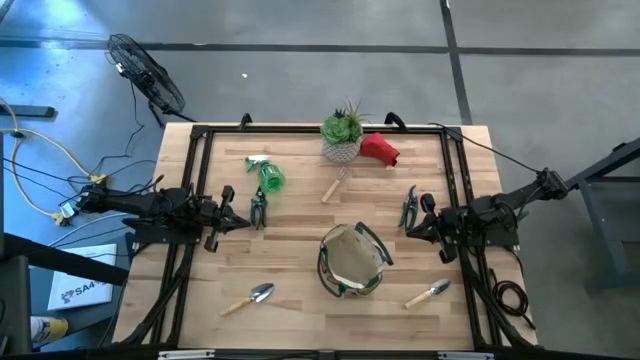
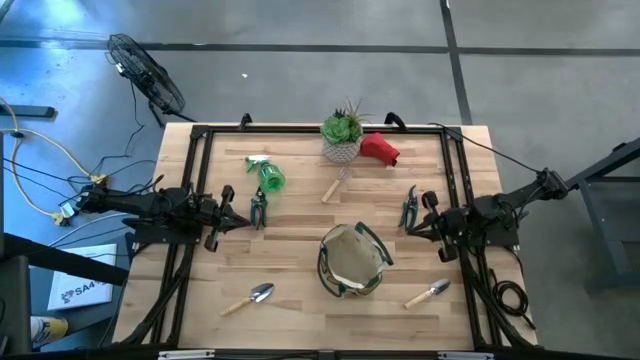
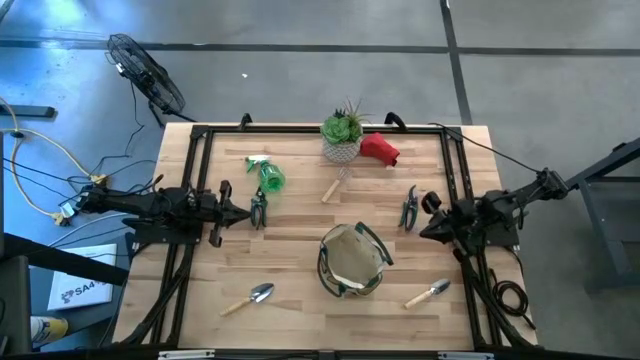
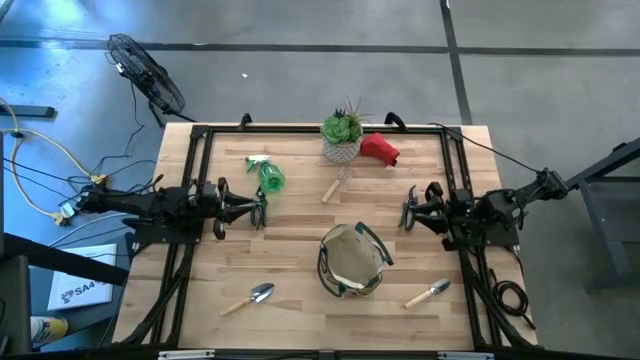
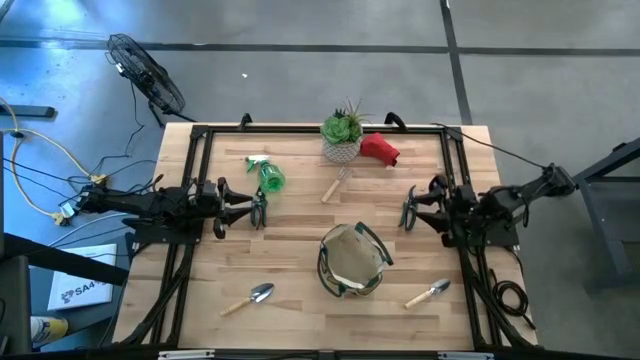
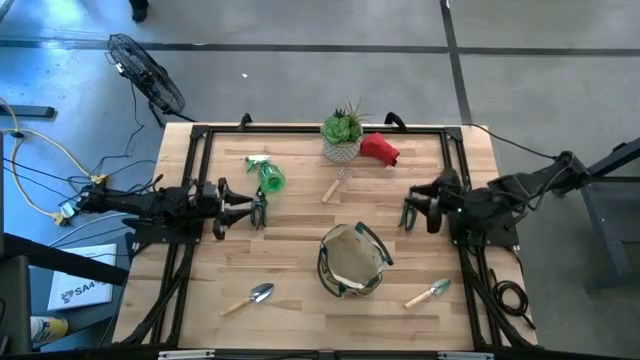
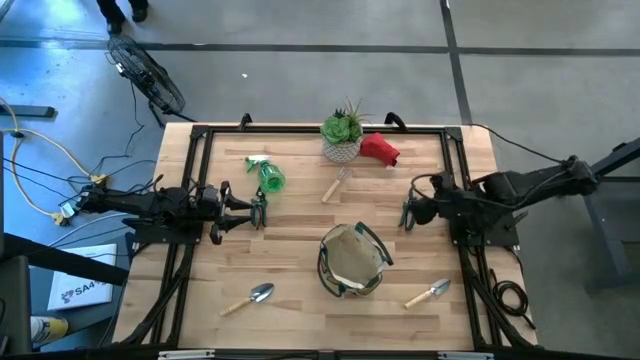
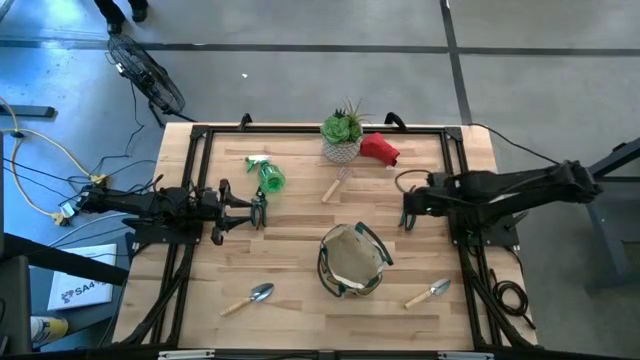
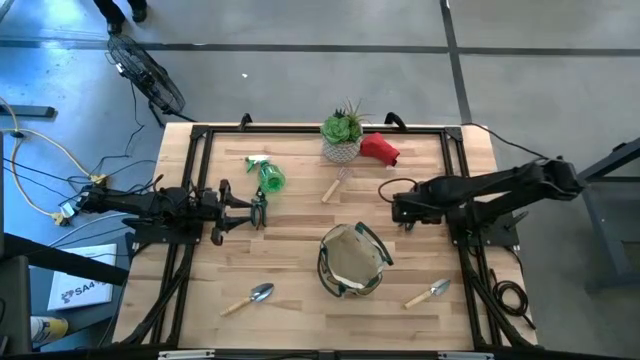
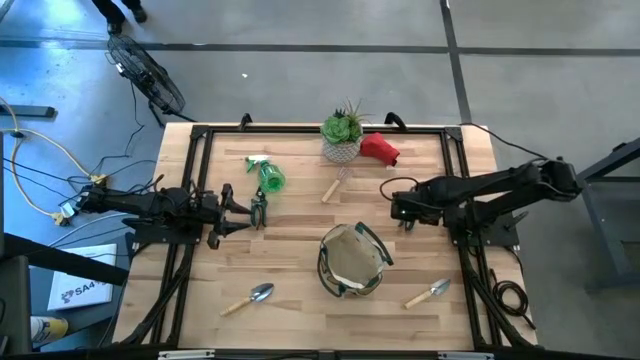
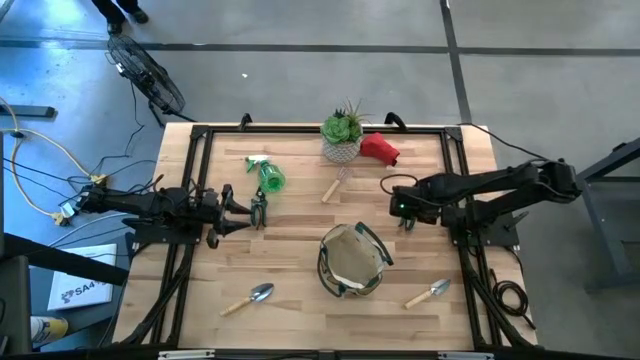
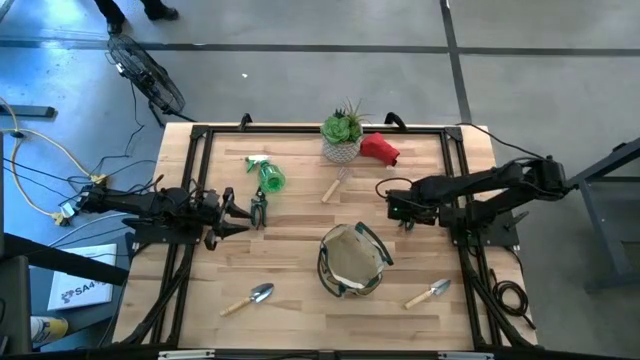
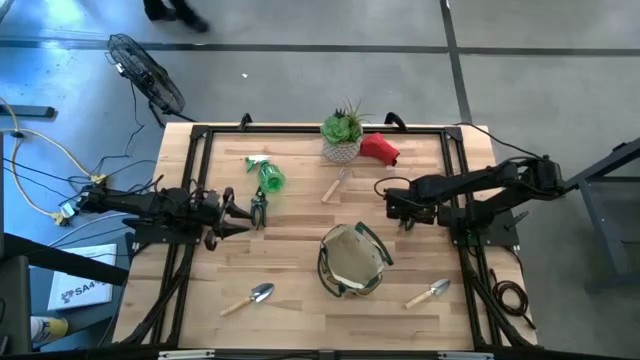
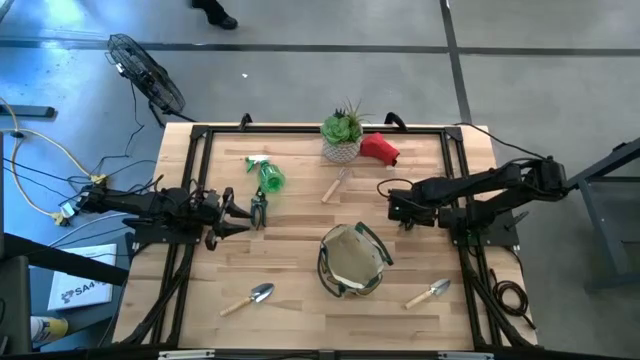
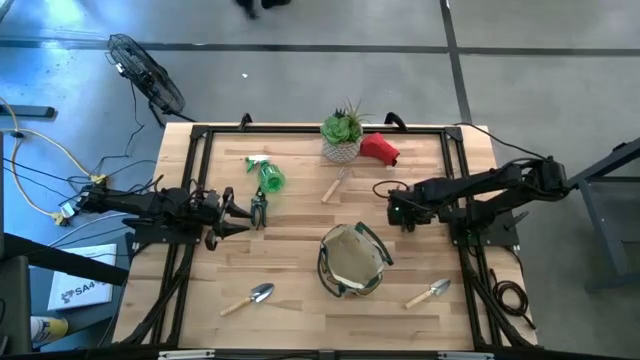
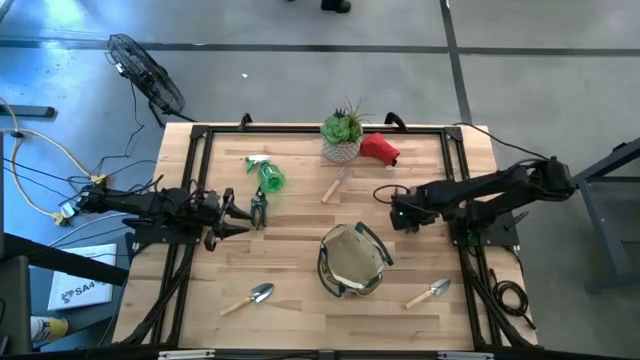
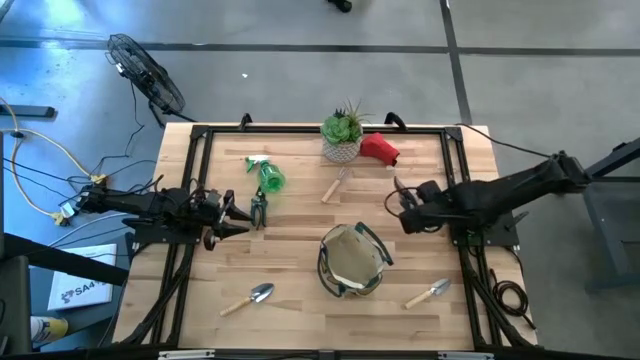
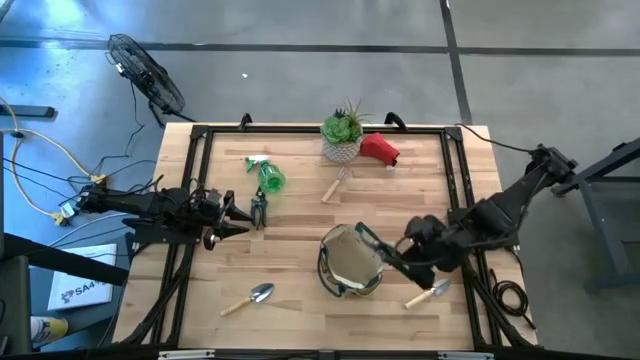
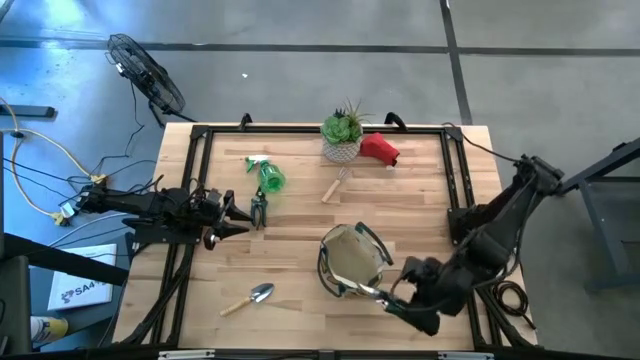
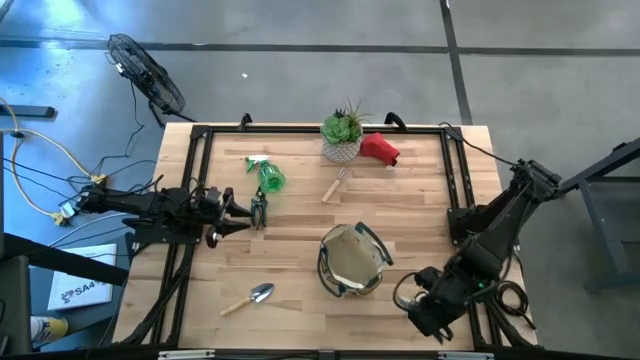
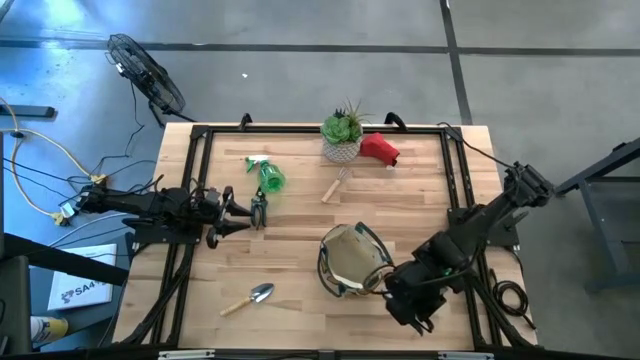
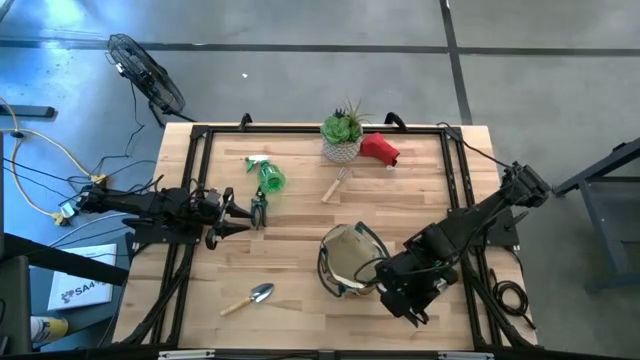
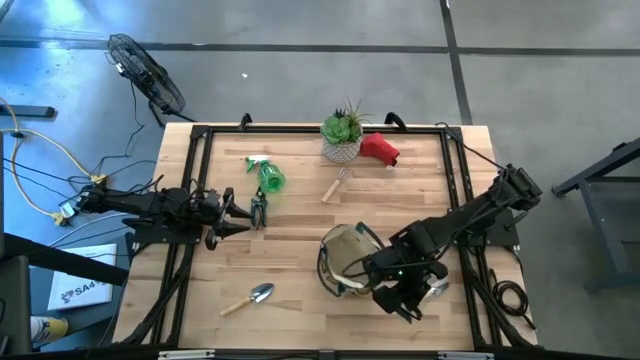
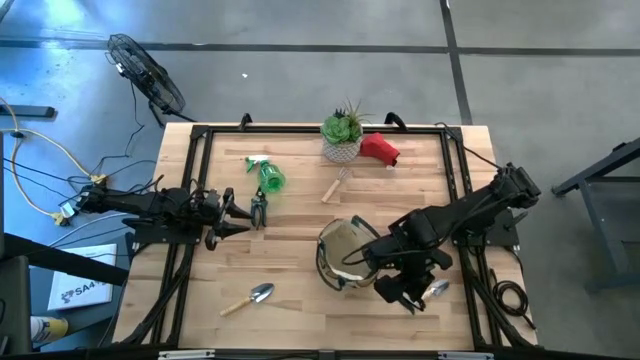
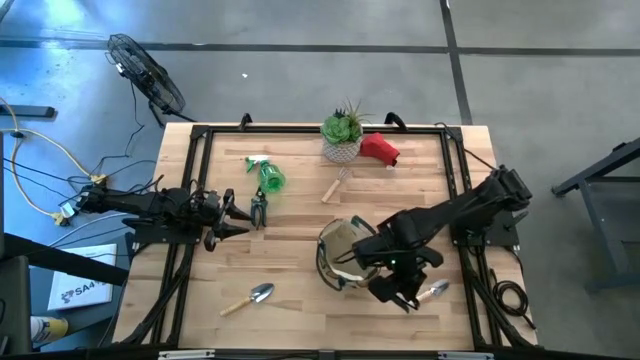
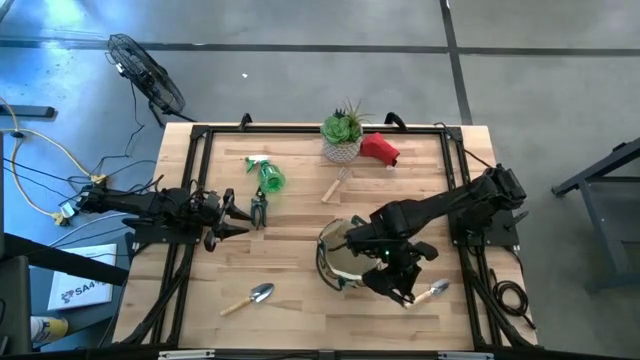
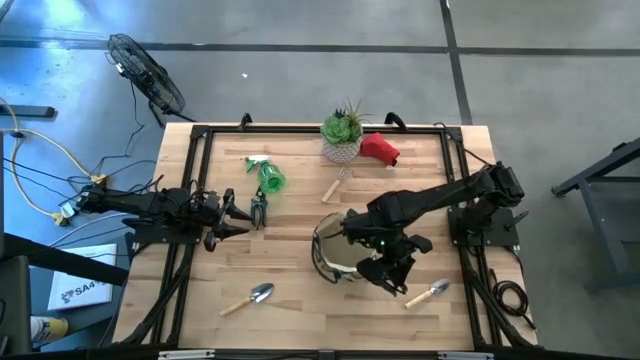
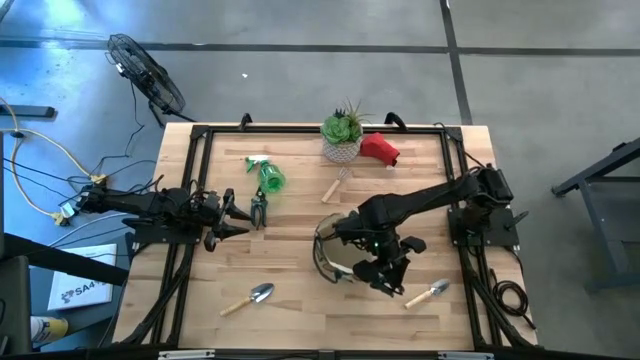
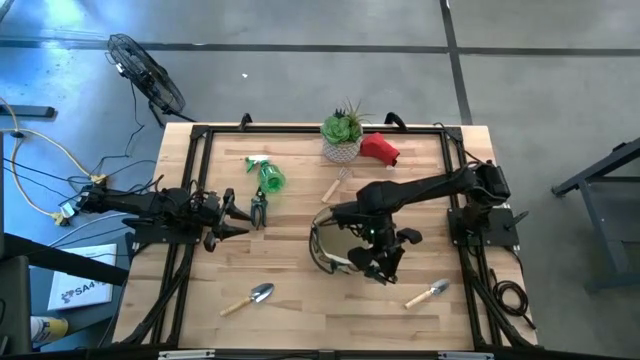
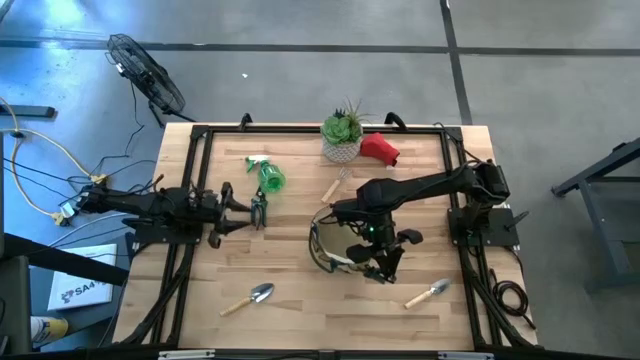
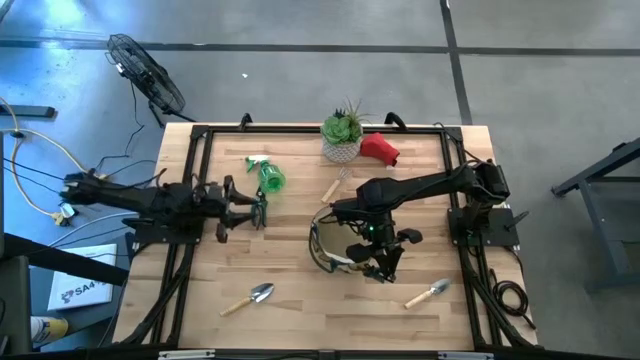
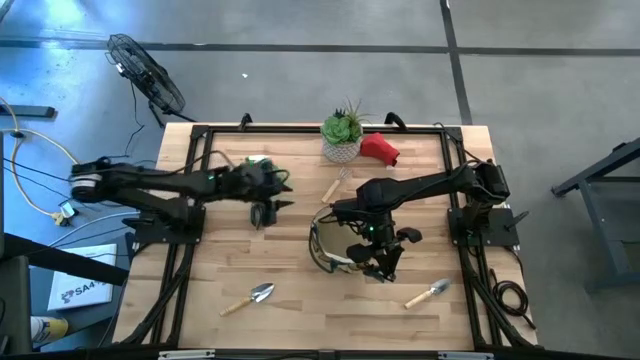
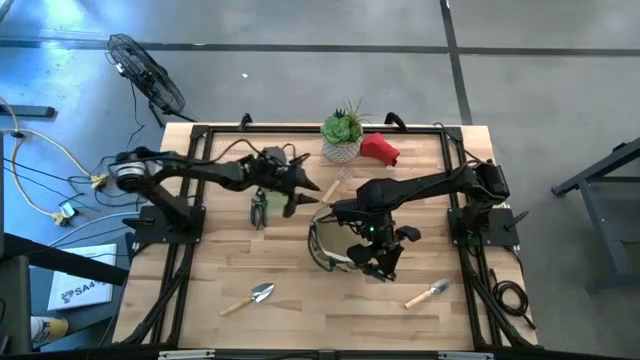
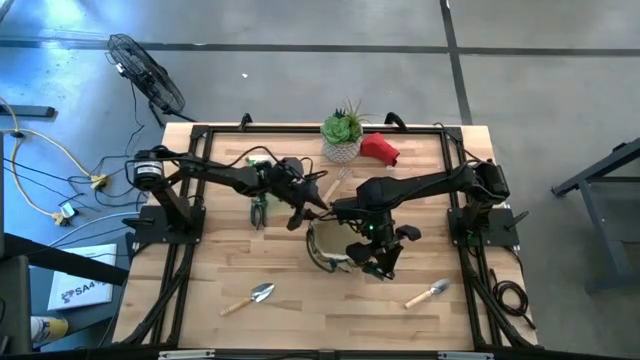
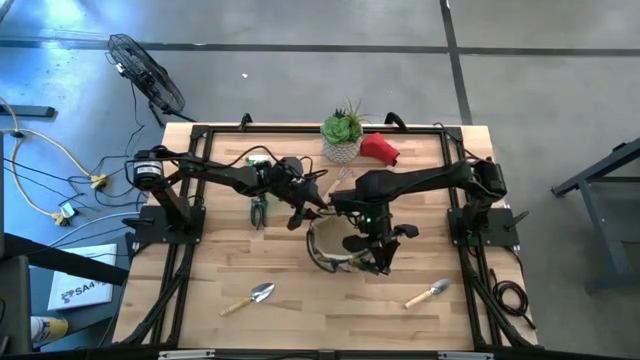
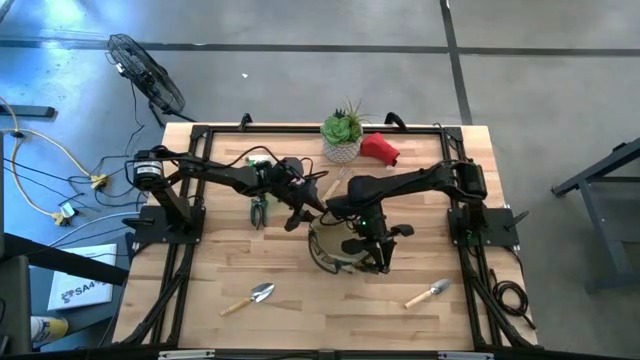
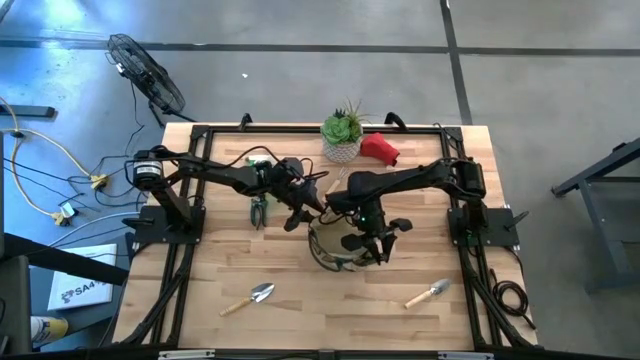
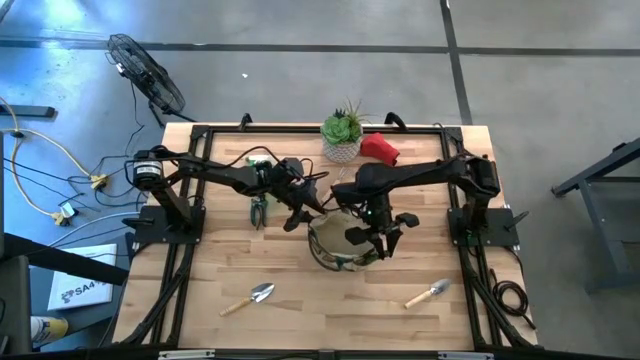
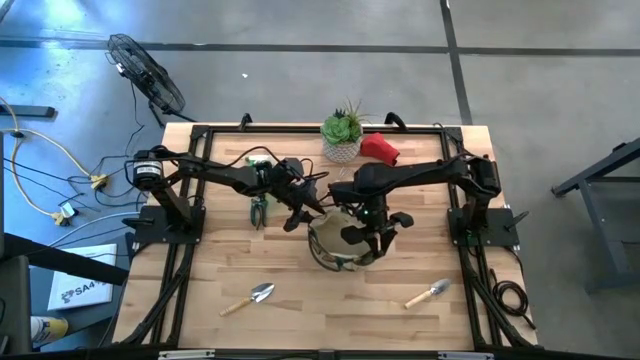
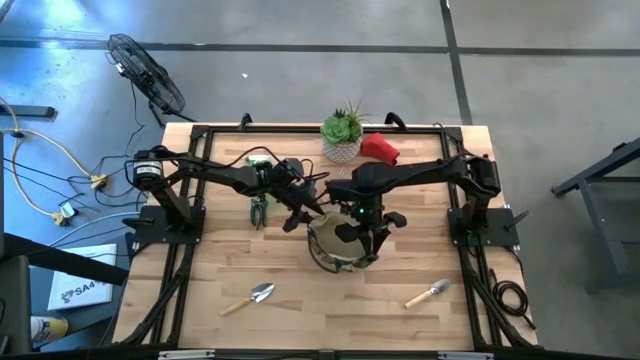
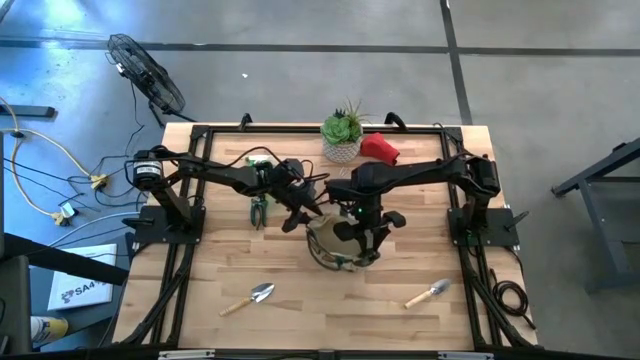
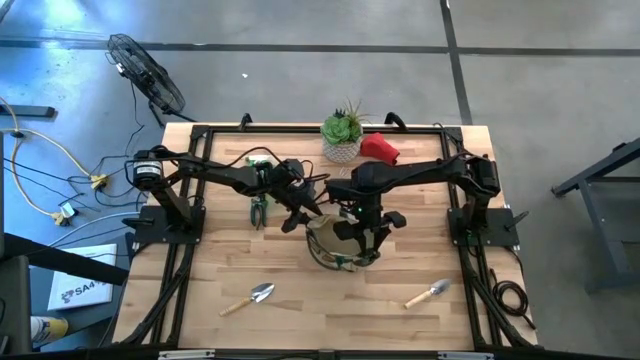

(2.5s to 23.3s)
Task: Pick & Place Garden tools in Gardening bag
Put the right green shear scissors into the gardening bag
